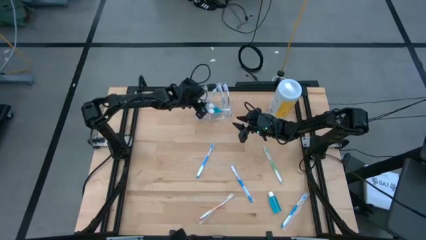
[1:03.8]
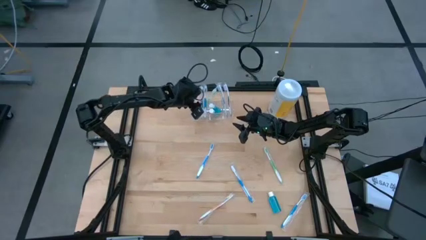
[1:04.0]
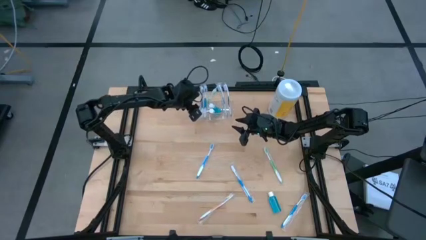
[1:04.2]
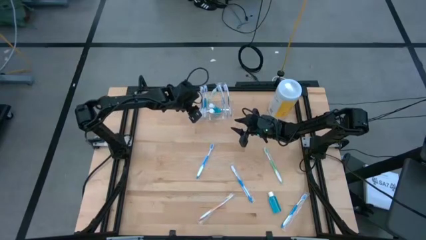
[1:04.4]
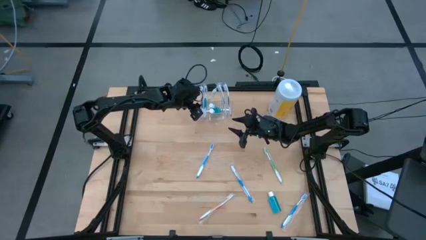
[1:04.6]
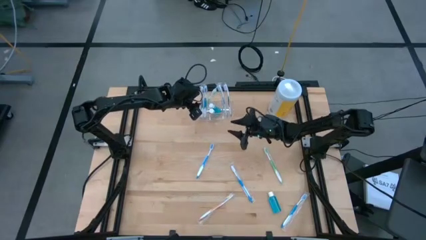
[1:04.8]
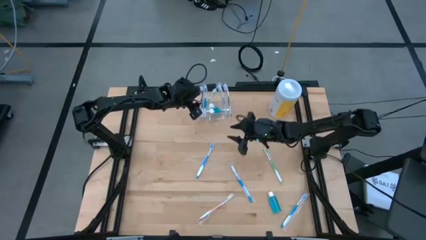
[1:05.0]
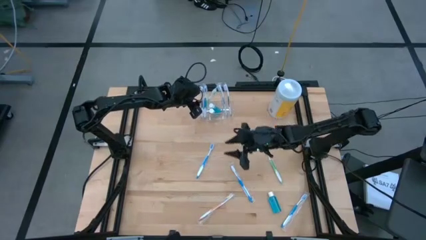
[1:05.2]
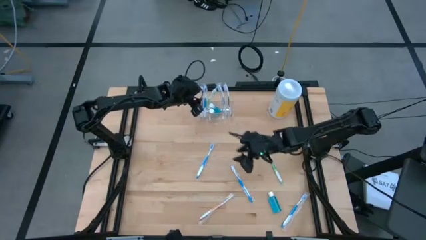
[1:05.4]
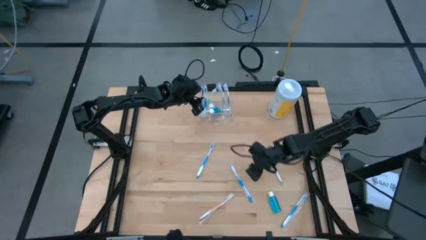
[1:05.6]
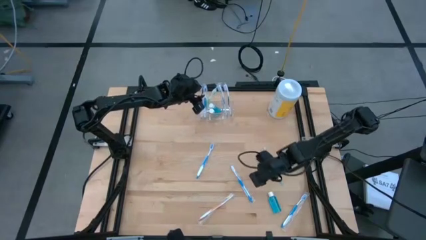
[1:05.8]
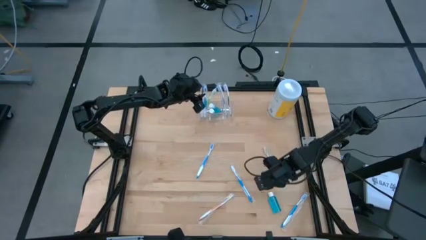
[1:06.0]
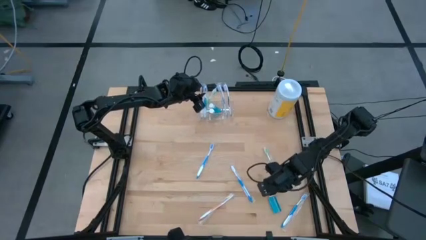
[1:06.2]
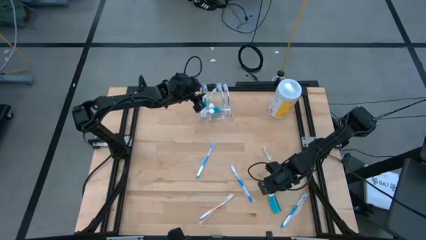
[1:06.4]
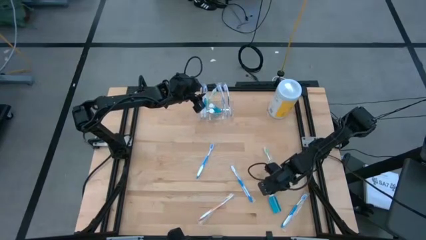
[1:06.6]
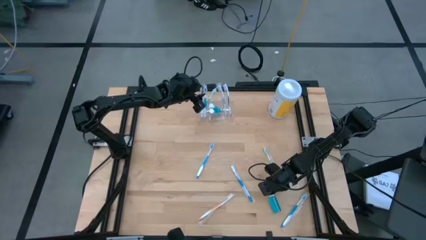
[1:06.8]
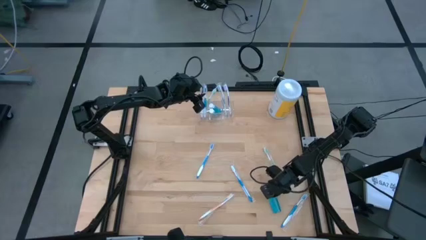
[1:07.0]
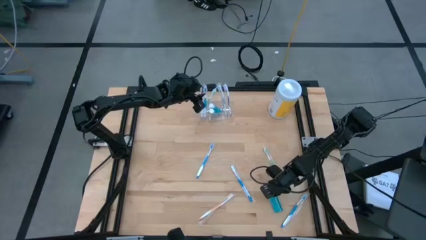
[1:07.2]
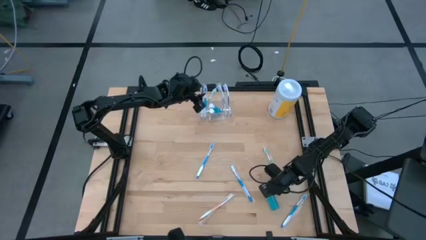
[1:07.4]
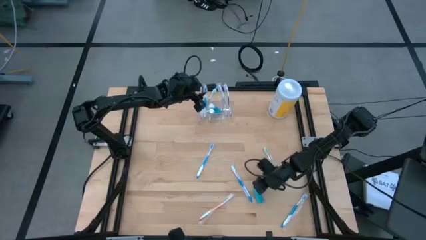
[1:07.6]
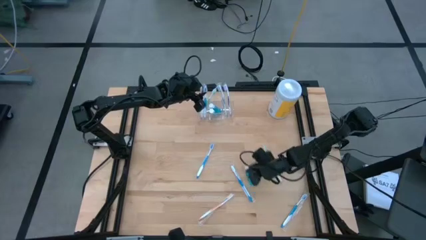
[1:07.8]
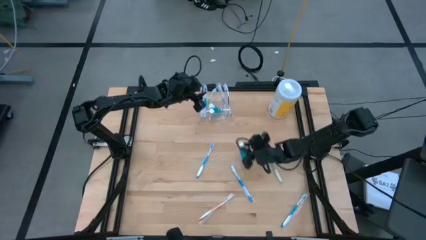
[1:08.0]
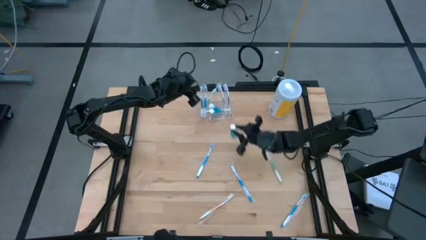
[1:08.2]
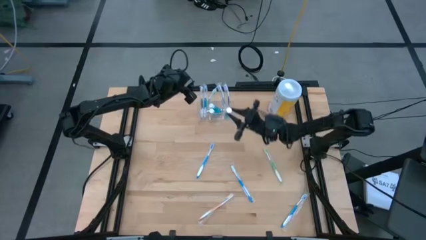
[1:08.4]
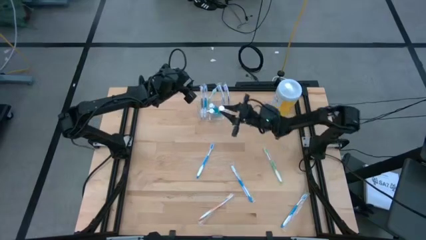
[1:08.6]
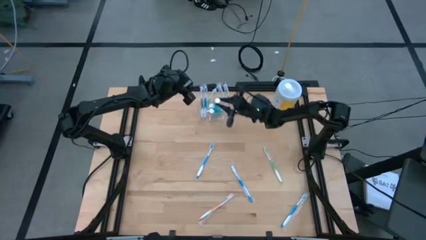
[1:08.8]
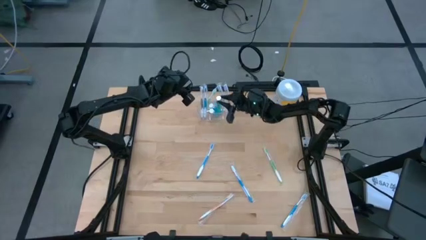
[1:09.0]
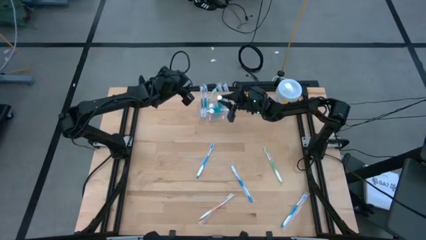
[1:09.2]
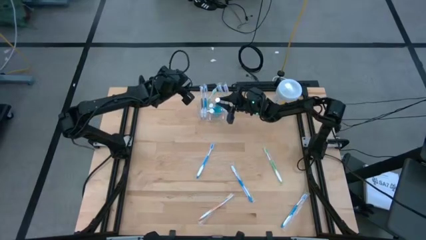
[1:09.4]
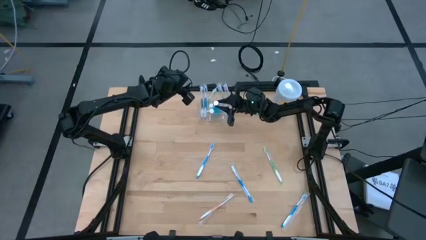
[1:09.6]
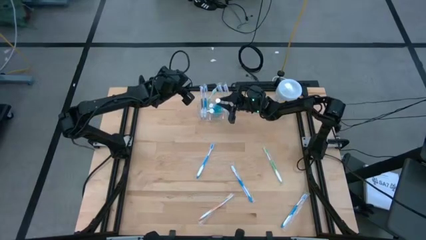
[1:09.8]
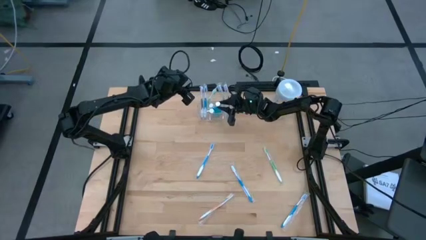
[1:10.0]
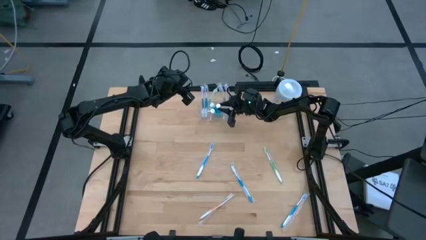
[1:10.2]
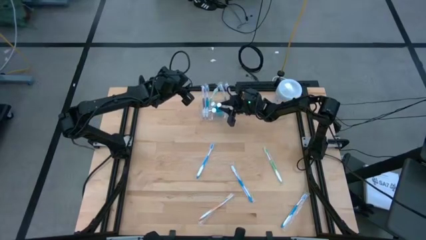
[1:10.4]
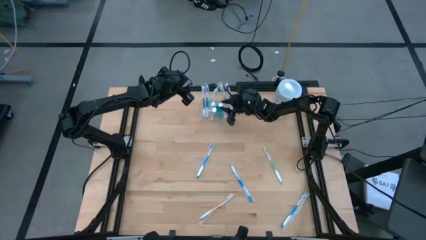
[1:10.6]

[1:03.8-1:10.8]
Task: Pick & Place toothbrushing station
Put the mouthwash into the transparent organizer

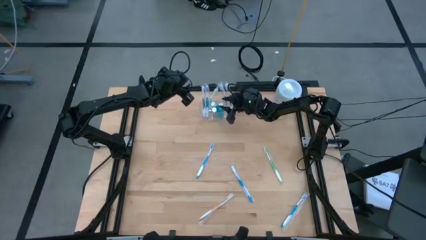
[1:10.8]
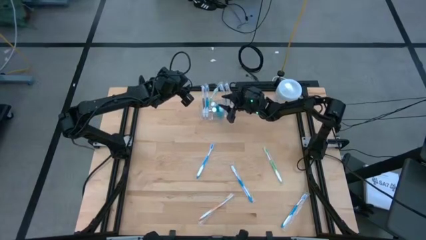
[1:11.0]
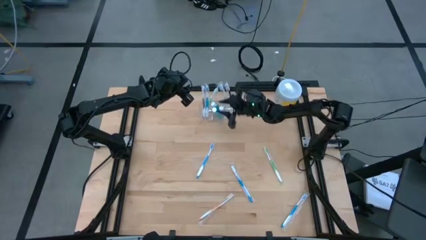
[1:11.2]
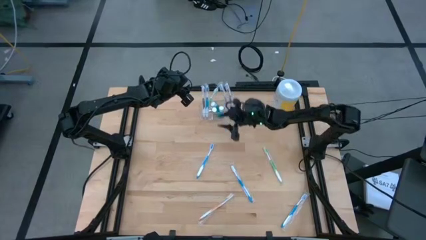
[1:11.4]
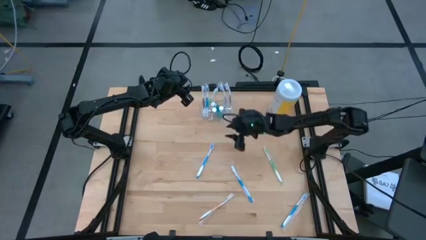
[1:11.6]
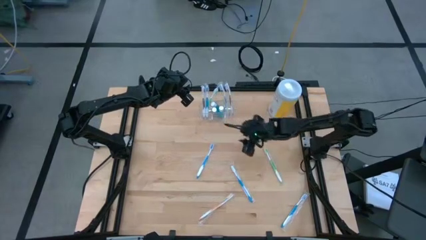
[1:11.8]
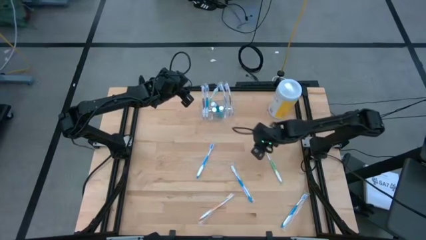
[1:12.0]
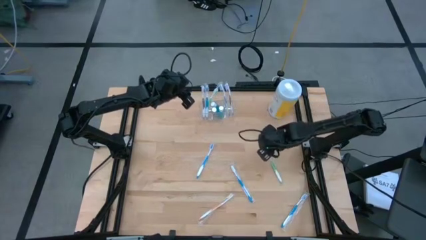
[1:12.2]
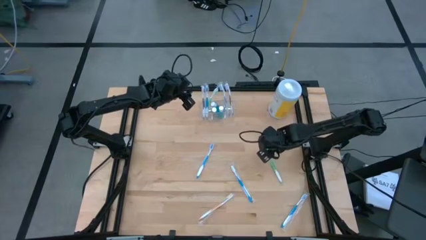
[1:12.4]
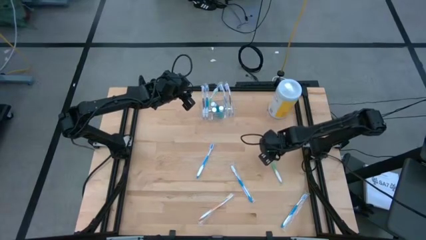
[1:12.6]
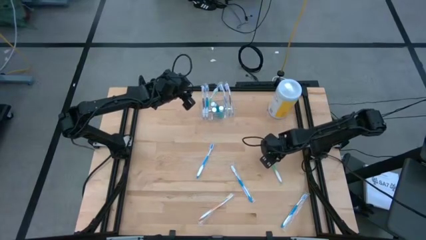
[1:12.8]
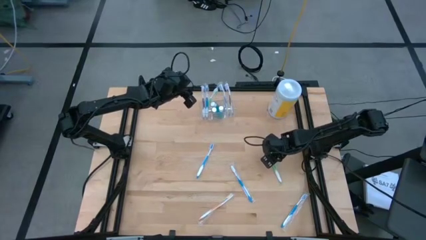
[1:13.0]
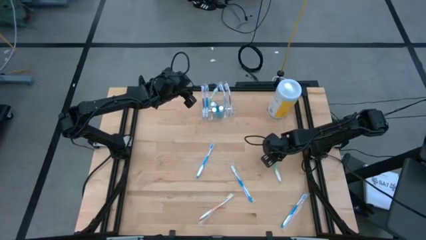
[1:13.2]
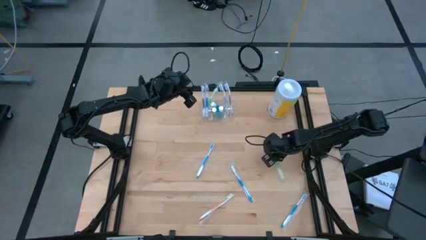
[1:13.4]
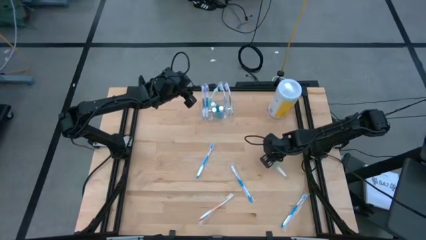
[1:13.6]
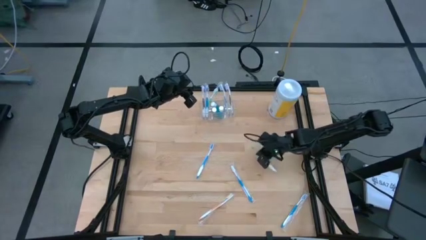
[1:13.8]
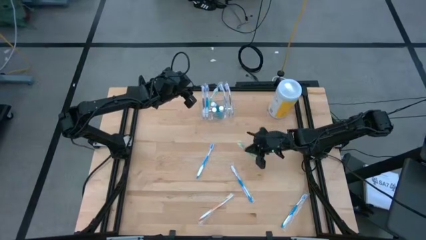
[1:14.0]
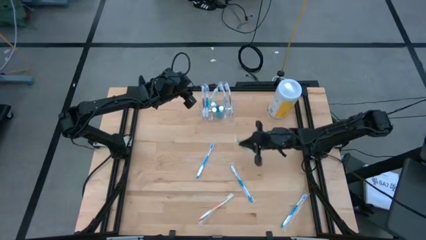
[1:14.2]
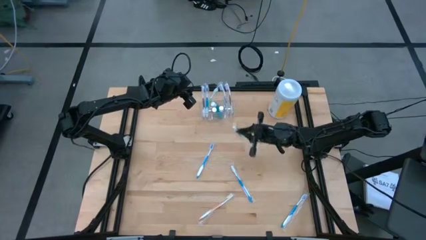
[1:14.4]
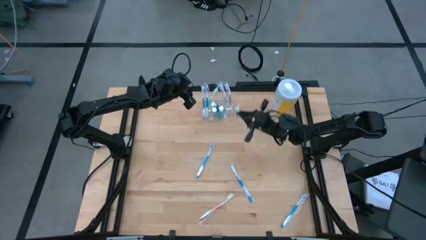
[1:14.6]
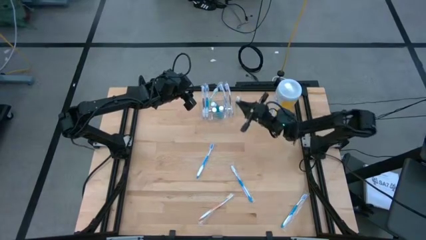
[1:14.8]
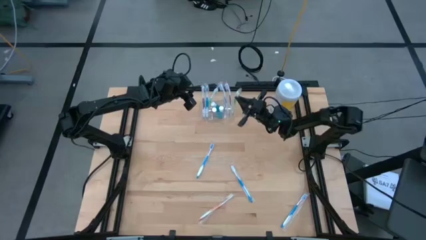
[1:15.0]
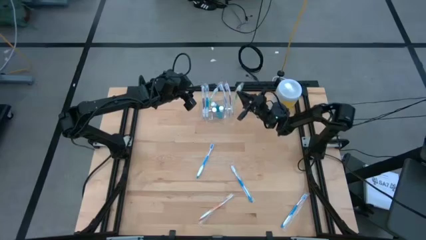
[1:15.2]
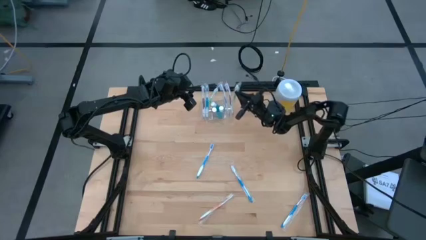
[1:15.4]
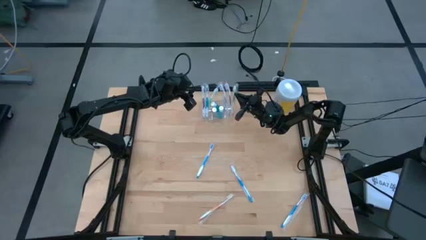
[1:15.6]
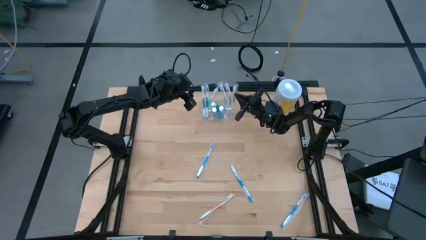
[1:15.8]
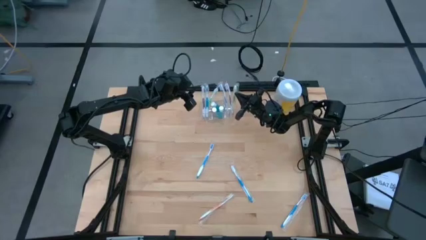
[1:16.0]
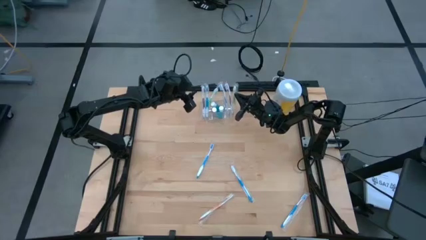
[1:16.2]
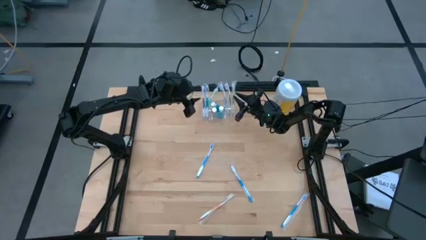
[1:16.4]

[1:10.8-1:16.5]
Put the green toothbrush into the transparent organizer

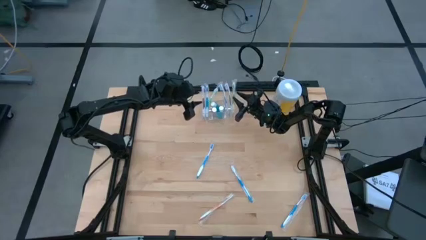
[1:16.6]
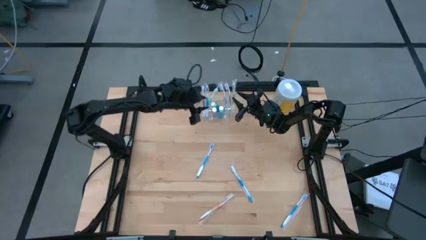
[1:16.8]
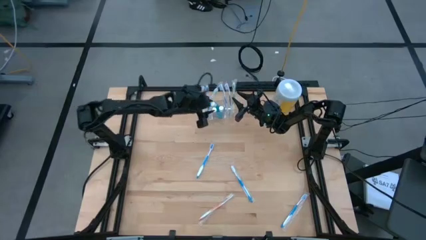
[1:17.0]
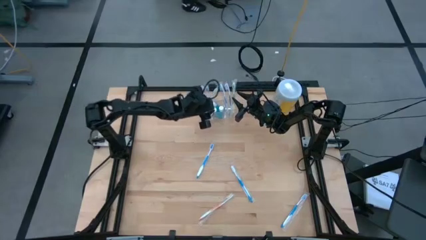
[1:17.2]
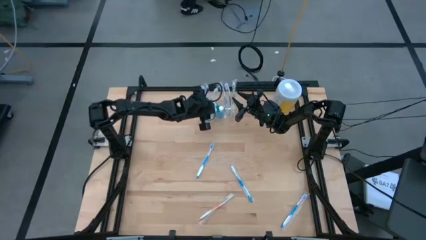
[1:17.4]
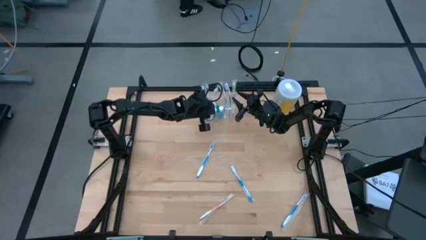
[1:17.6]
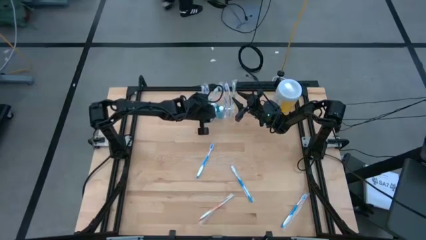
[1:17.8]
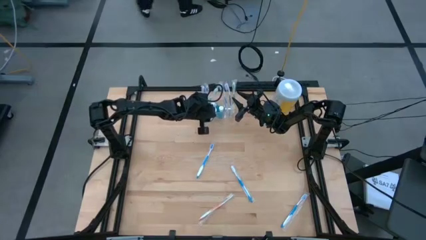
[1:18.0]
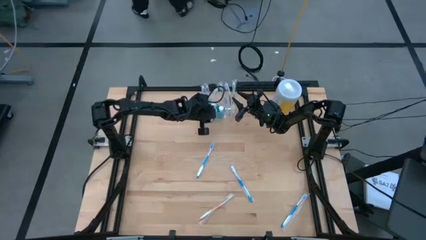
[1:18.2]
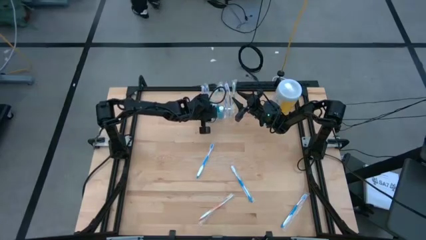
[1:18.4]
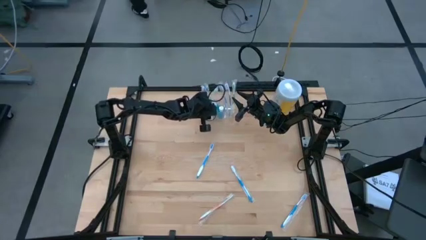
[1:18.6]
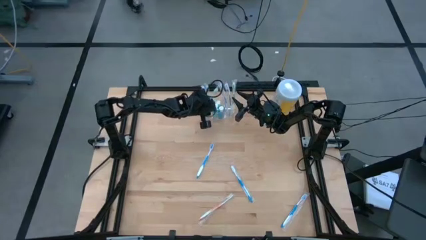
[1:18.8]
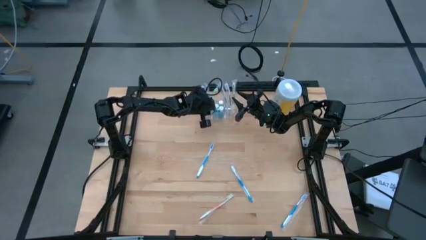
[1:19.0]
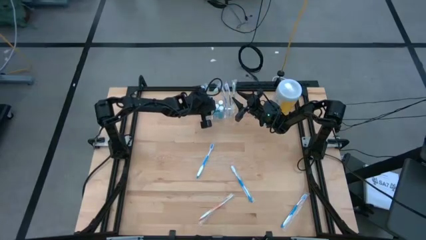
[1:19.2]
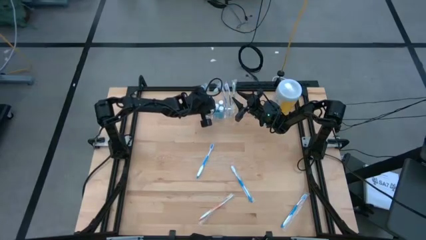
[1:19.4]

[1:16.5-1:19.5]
Adjust the mouthwash in the transparent organizer
